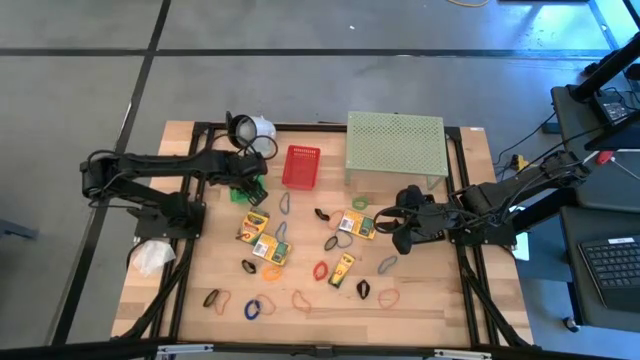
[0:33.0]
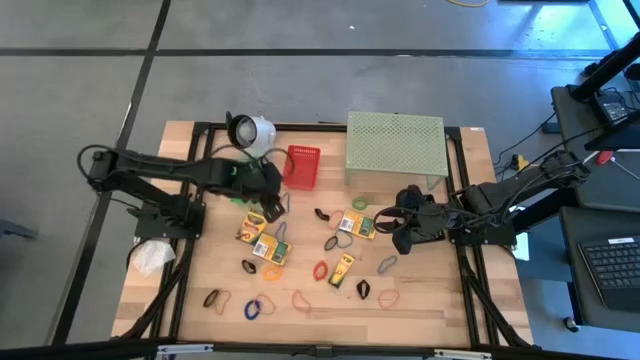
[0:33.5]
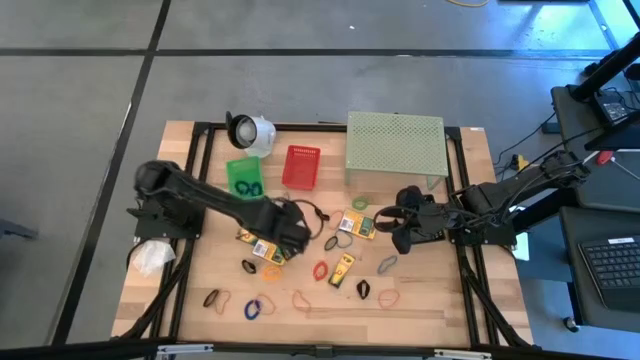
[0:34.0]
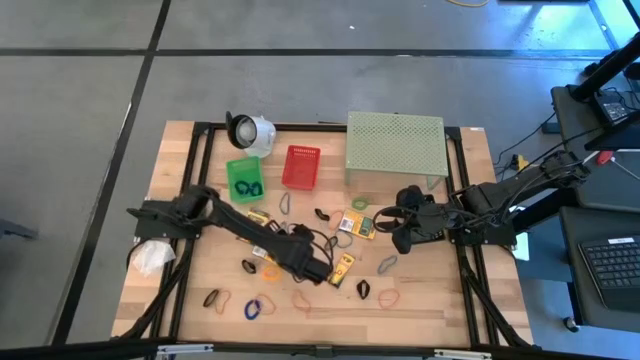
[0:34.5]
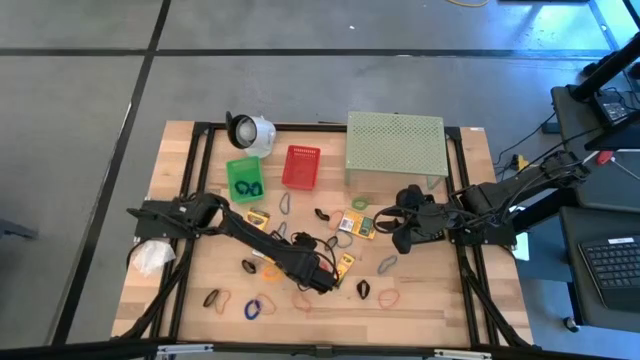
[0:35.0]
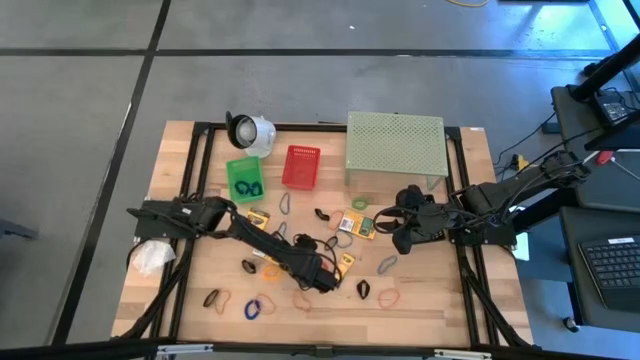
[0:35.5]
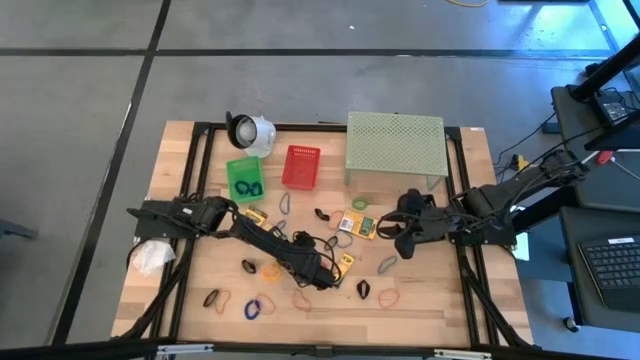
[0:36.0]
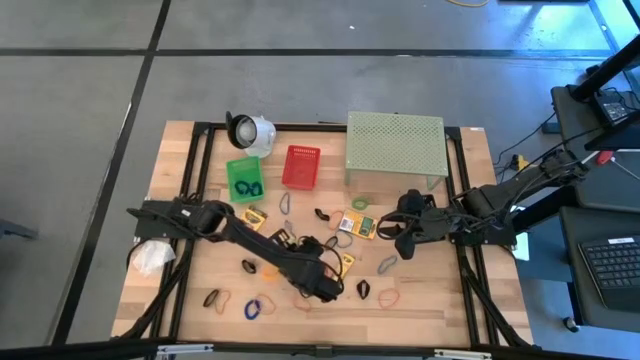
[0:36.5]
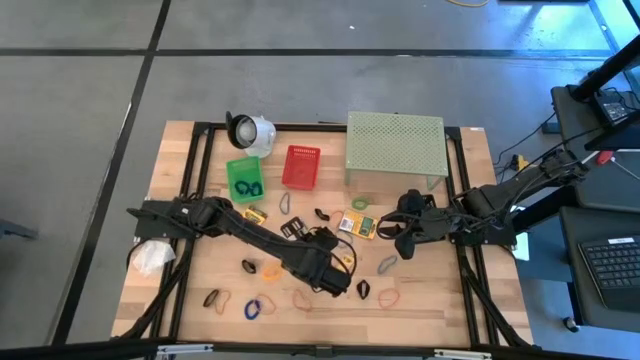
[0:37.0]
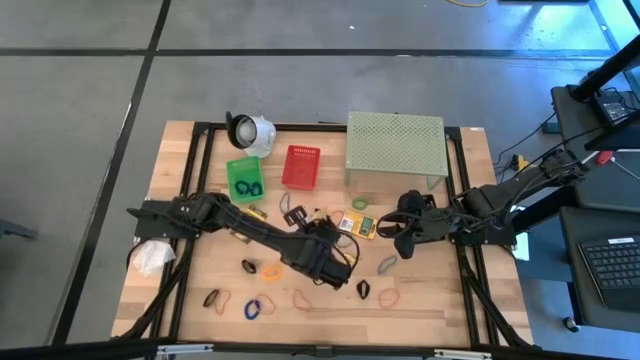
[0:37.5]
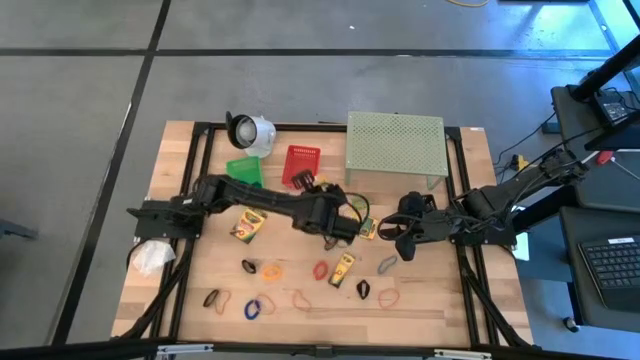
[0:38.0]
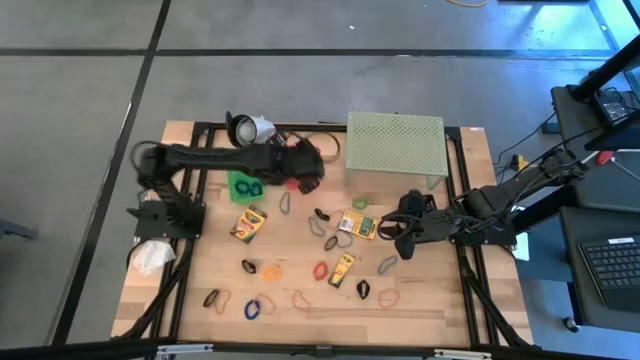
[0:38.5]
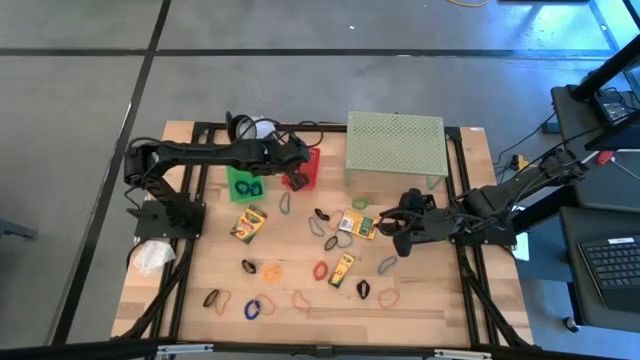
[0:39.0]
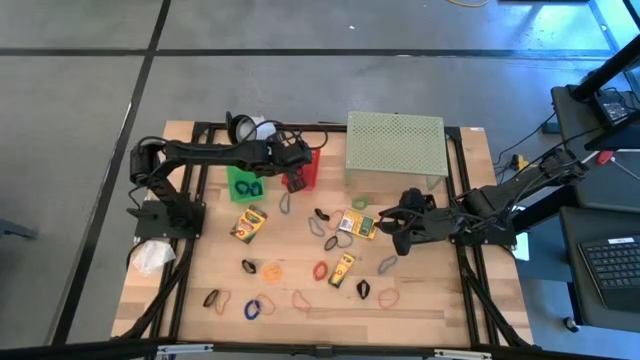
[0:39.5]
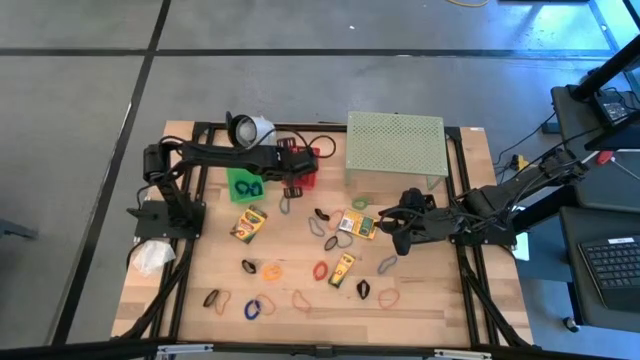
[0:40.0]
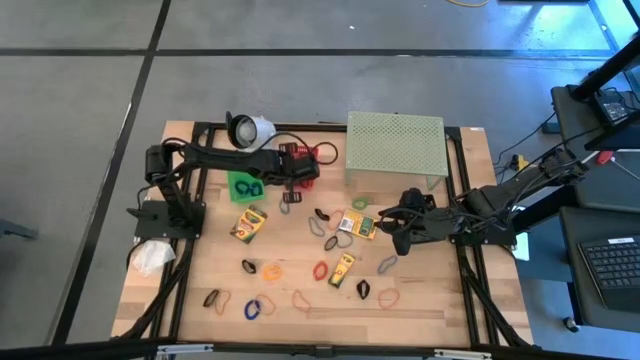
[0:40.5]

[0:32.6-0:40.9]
Task: Pick & Place Office Desk Supplies
Put the crayons box into the red basket

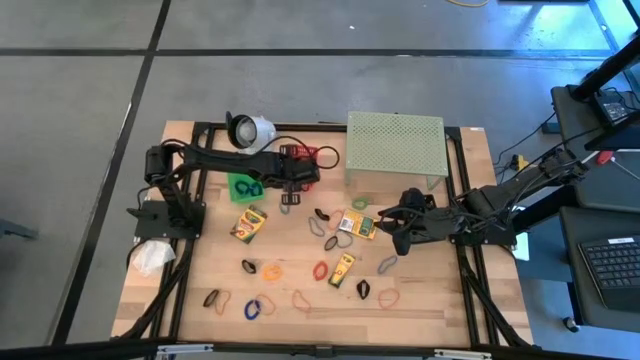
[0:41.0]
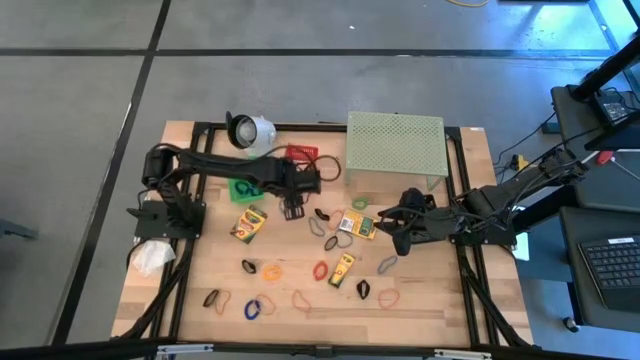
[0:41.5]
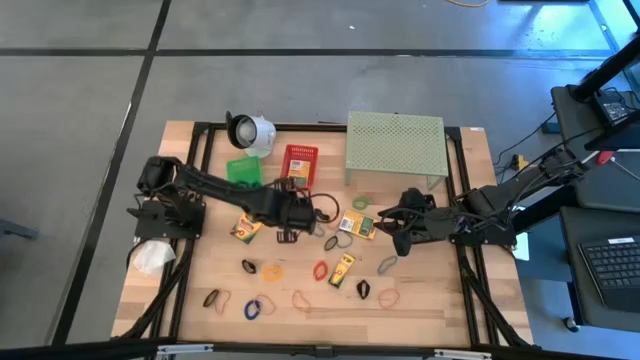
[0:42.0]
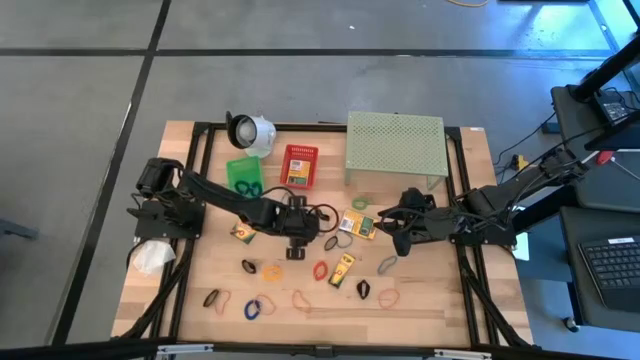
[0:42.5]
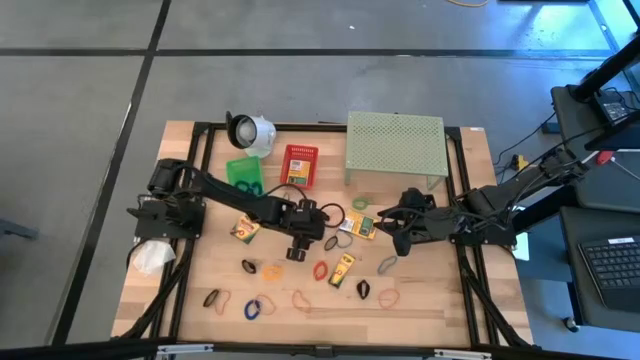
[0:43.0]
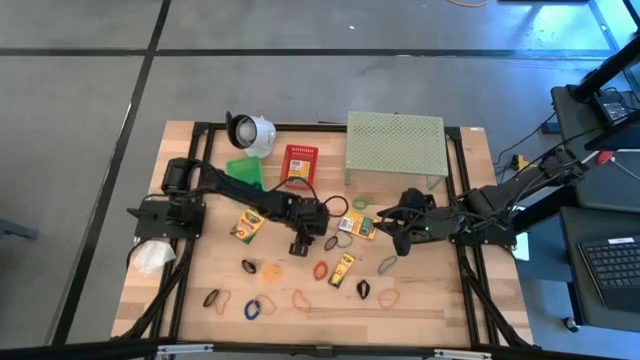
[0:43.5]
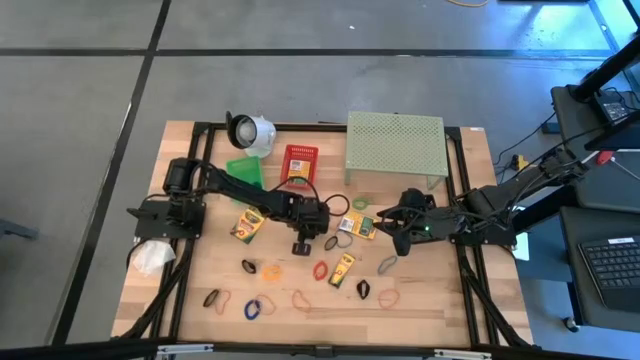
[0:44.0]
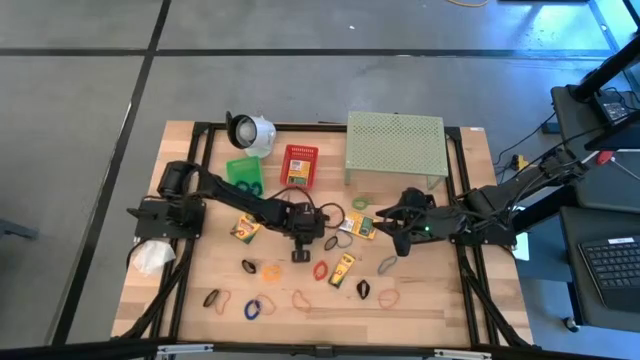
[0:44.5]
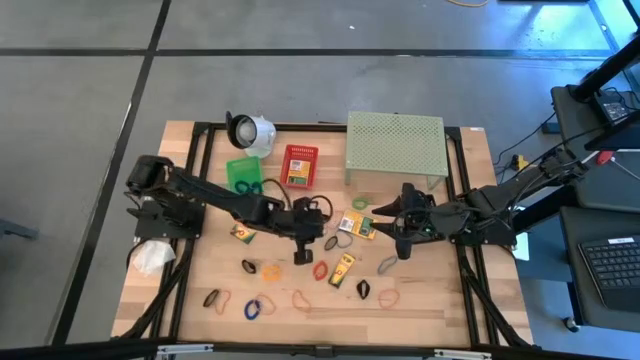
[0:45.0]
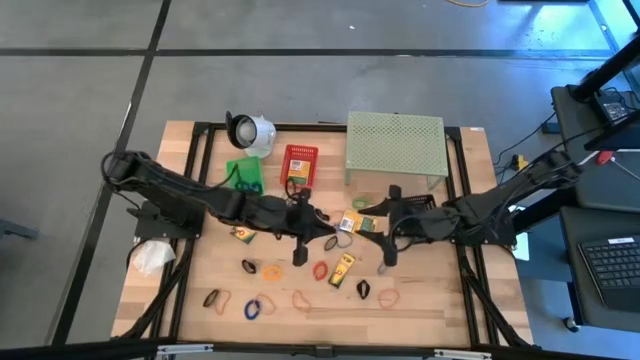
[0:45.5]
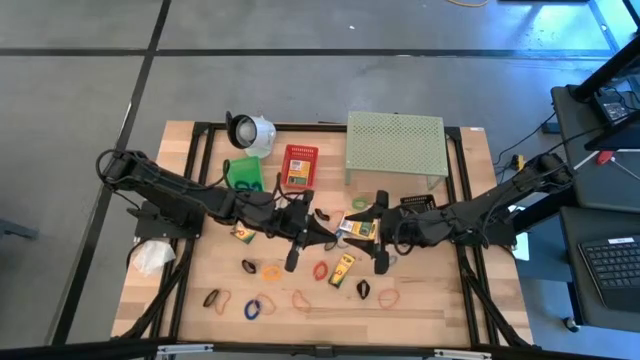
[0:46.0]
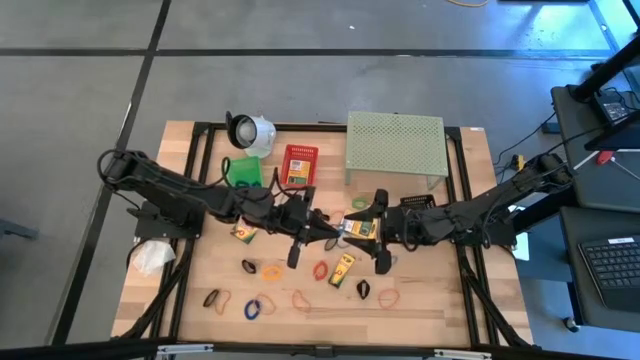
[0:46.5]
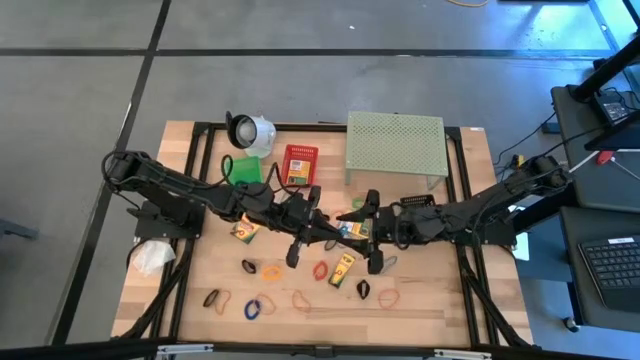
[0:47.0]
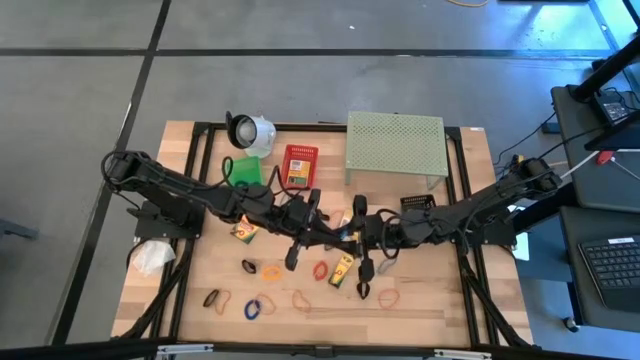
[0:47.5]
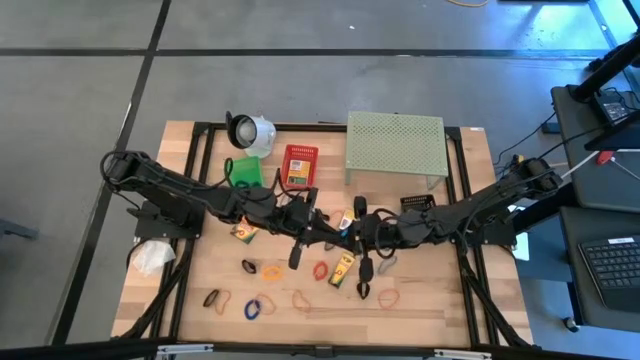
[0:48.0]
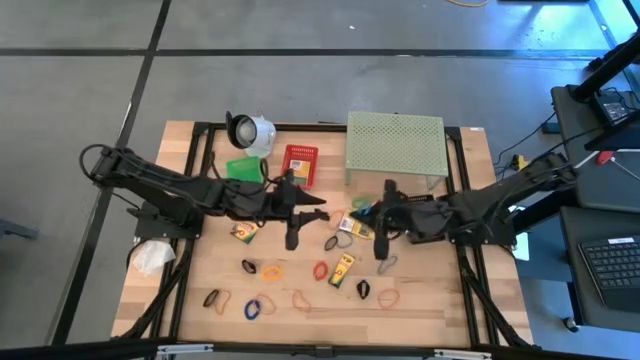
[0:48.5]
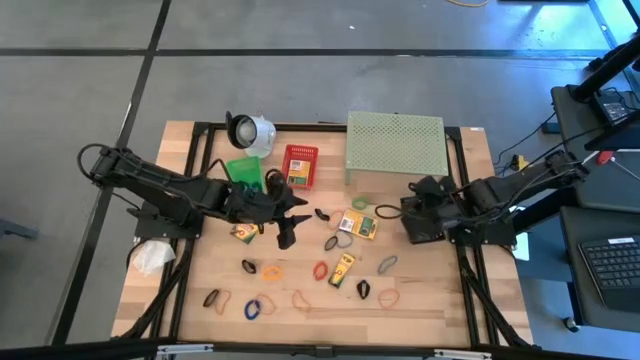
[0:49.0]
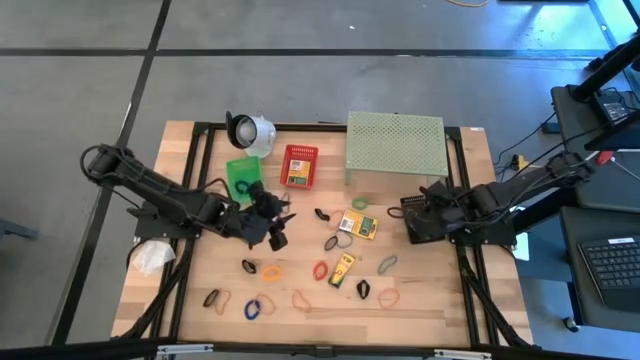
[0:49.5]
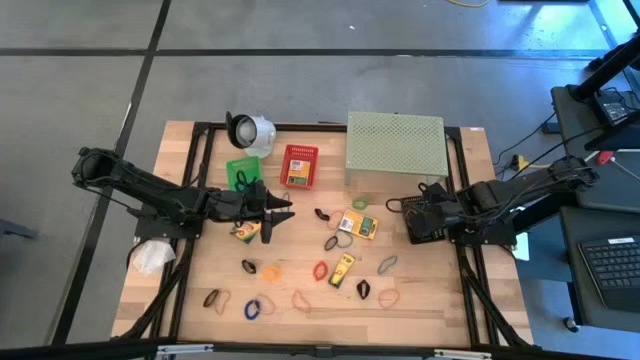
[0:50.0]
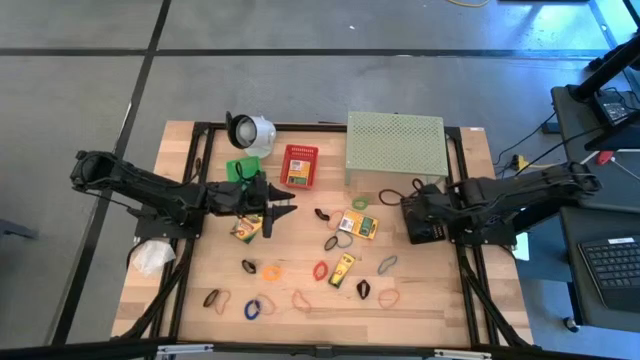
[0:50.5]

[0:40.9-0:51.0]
Put the blue rubber band into the black basket

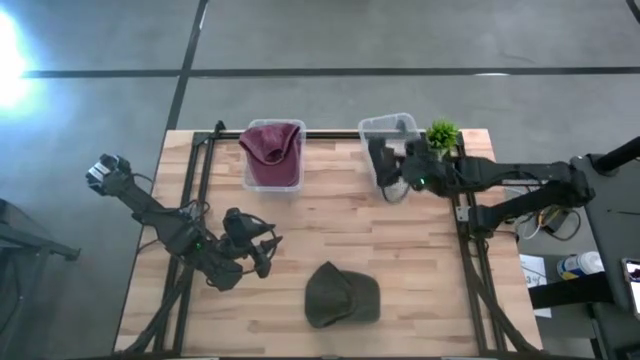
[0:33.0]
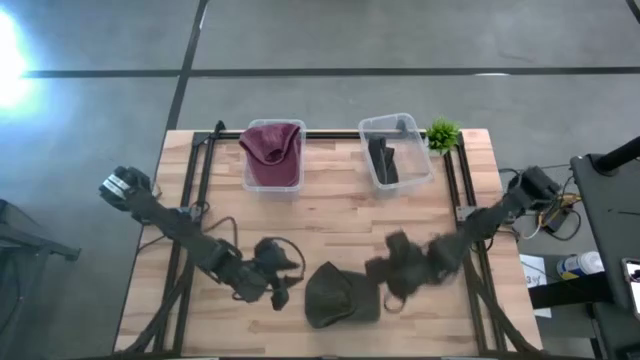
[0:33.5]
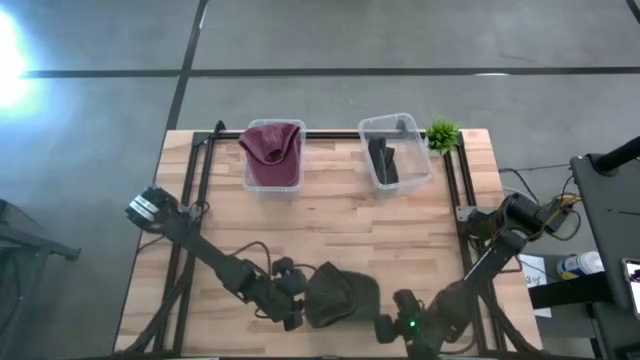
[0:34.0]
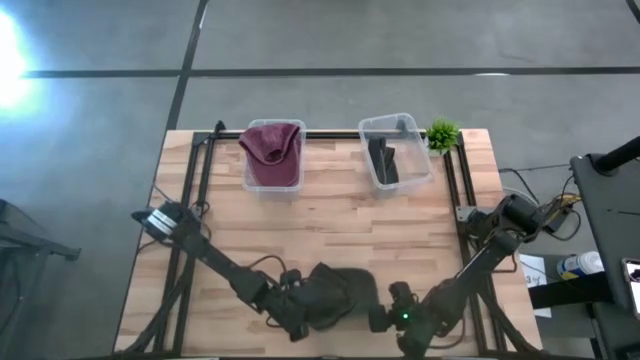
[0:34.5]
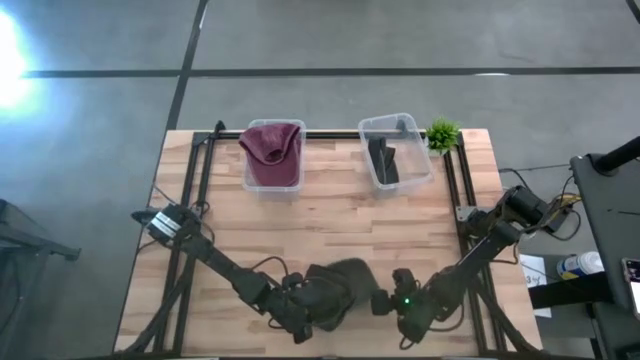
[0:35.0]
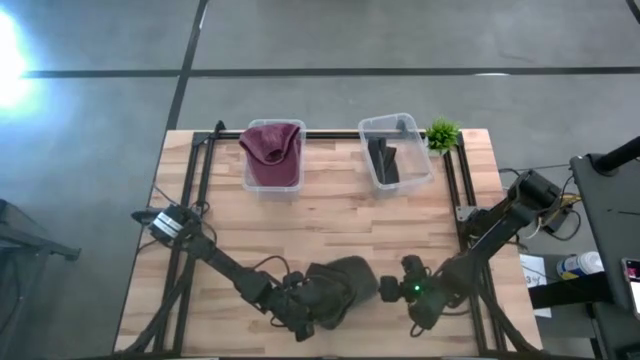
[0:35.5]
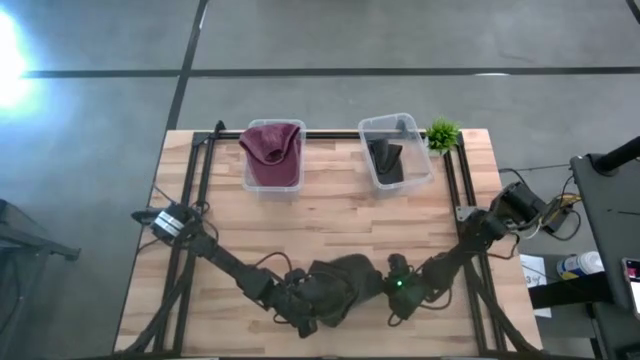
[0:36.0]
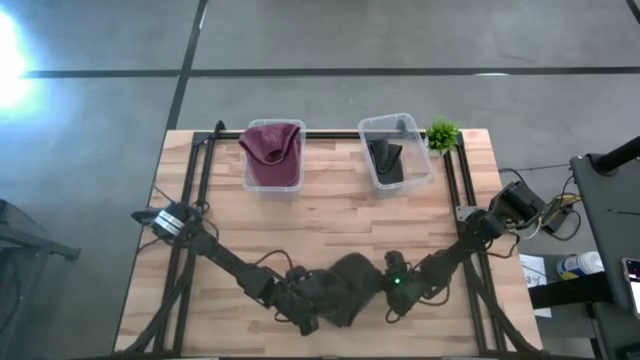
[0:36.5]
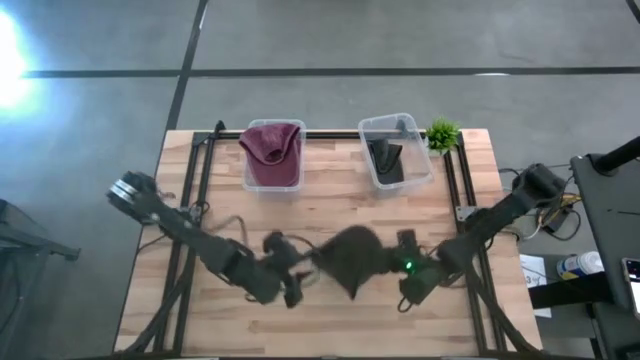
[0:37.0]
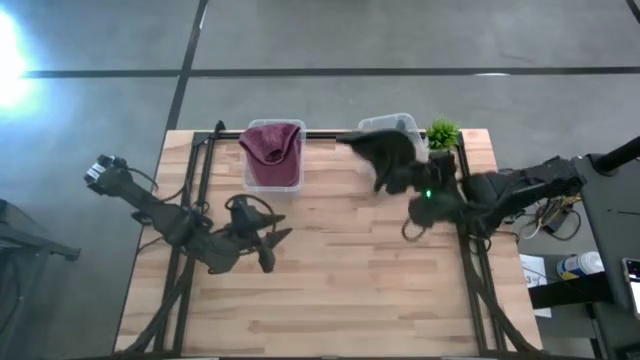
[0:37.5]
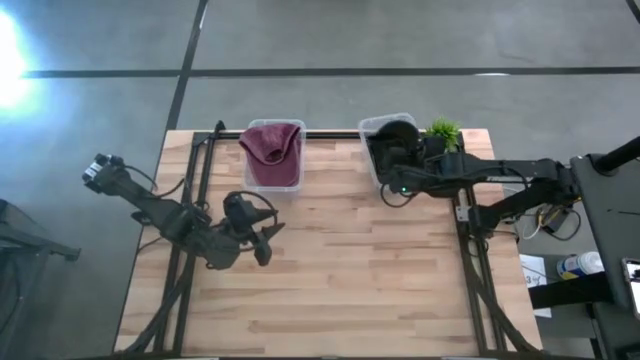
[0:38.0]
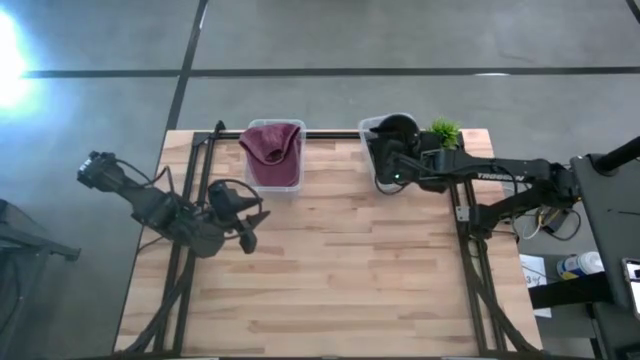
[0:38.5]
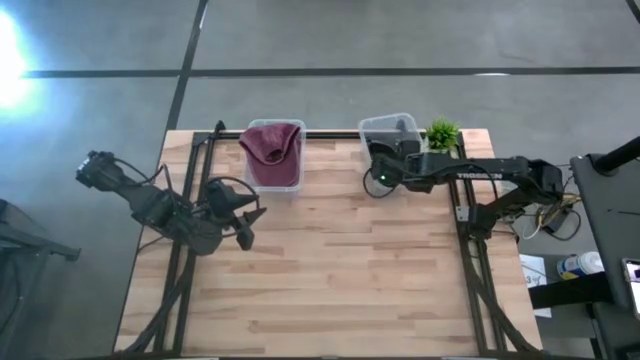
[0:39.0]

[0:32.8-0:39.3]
Task: Pick & Place hat
Put the black cap into the right transparent bin
